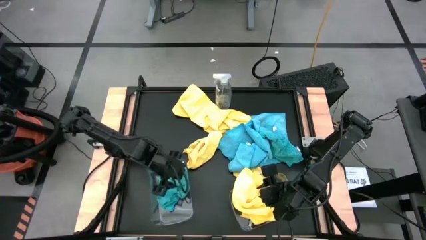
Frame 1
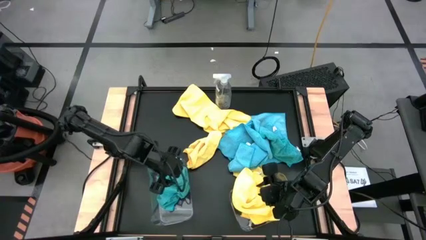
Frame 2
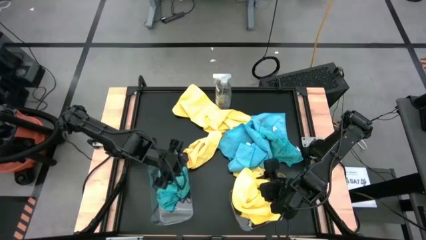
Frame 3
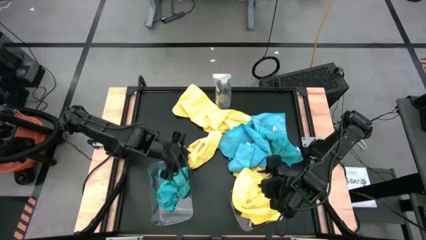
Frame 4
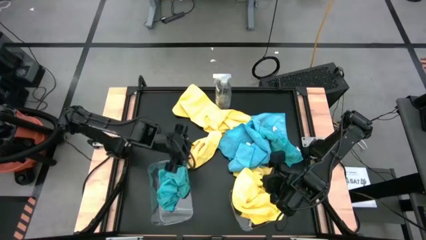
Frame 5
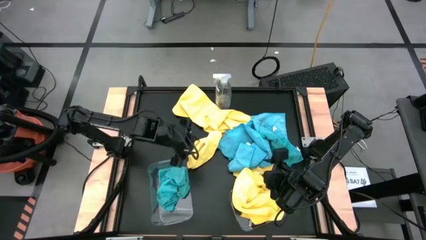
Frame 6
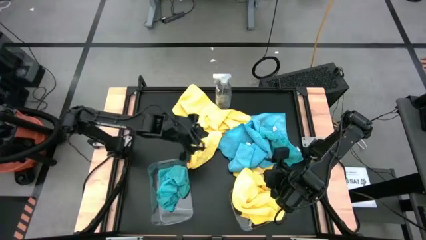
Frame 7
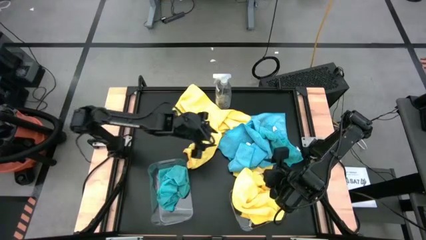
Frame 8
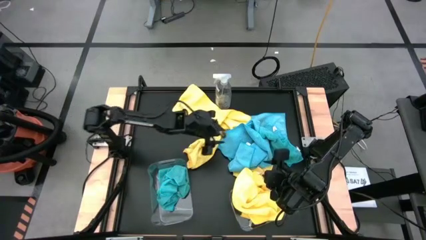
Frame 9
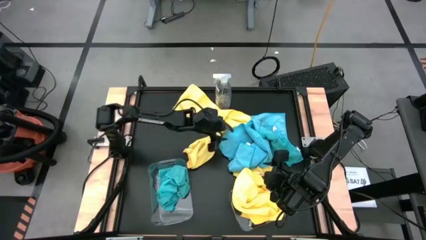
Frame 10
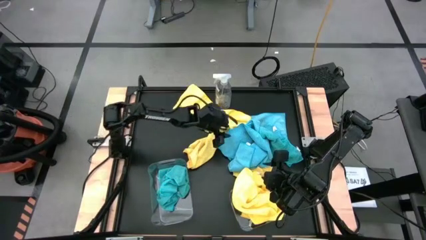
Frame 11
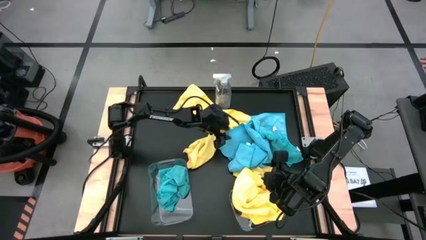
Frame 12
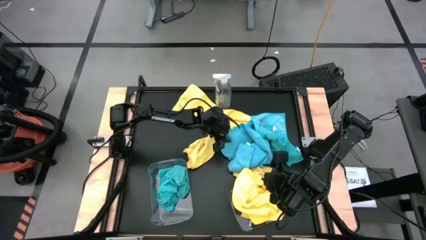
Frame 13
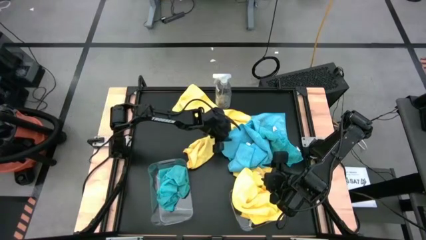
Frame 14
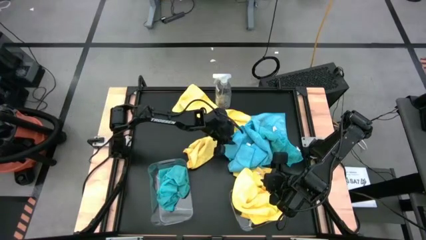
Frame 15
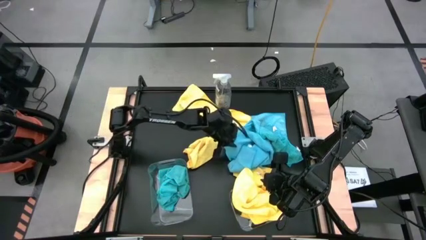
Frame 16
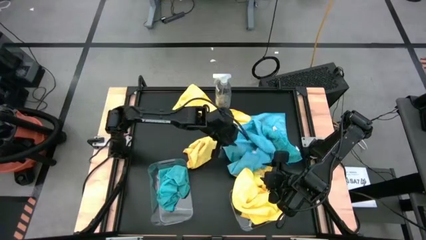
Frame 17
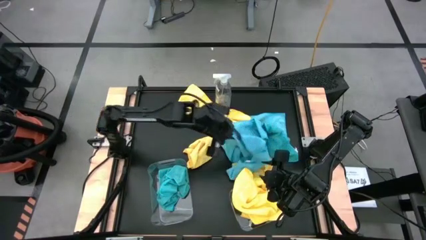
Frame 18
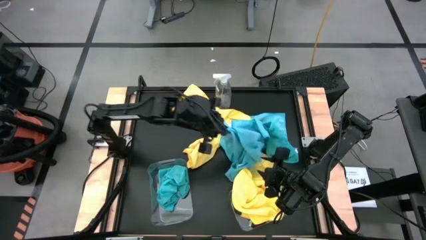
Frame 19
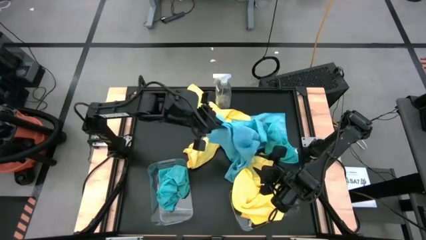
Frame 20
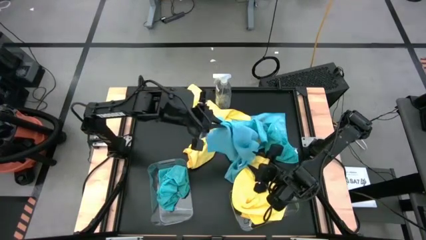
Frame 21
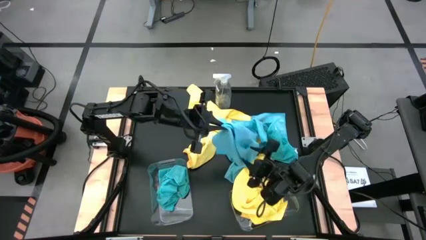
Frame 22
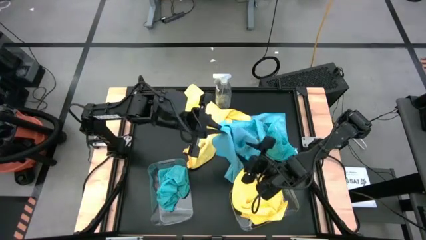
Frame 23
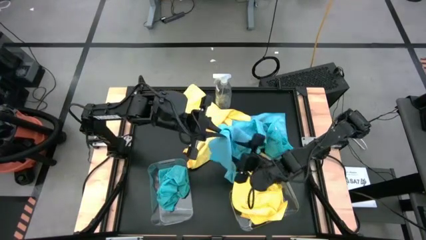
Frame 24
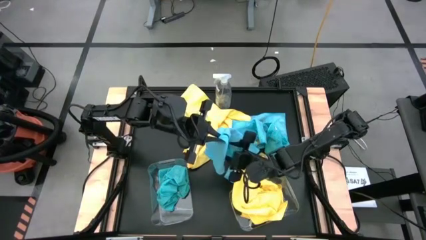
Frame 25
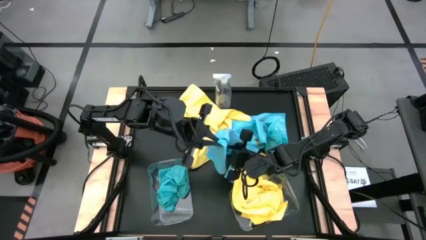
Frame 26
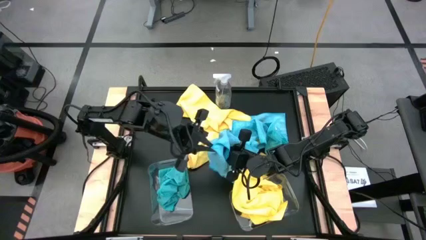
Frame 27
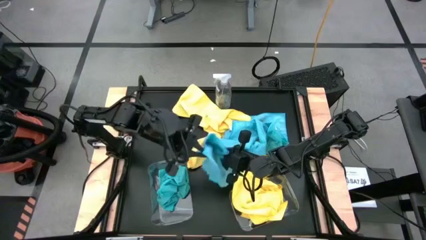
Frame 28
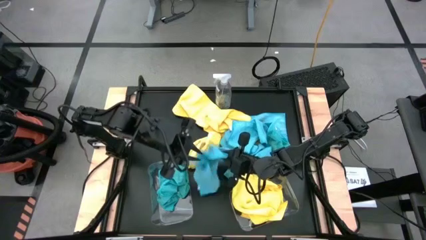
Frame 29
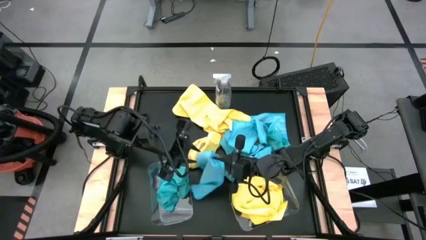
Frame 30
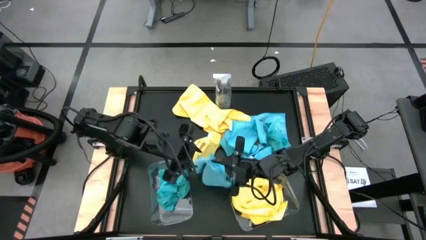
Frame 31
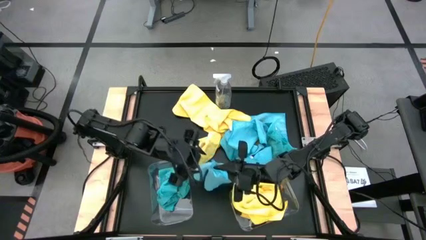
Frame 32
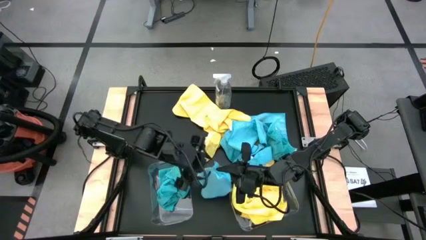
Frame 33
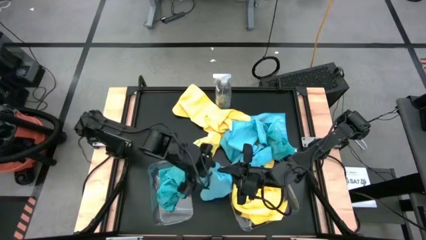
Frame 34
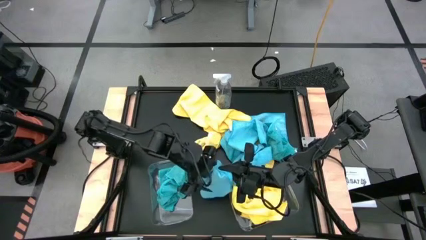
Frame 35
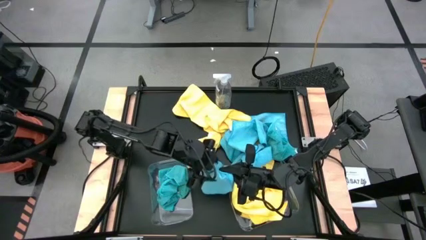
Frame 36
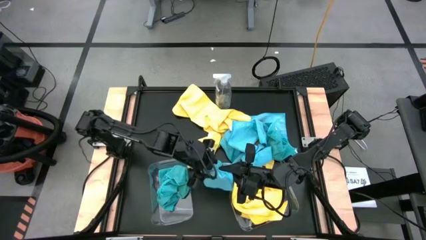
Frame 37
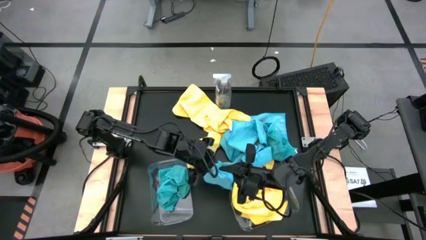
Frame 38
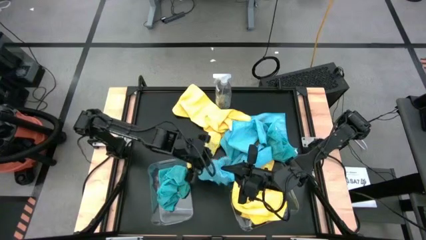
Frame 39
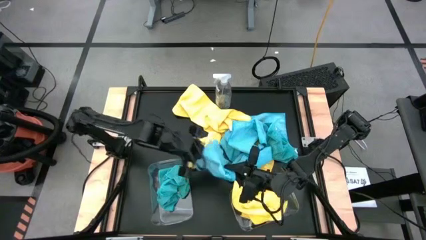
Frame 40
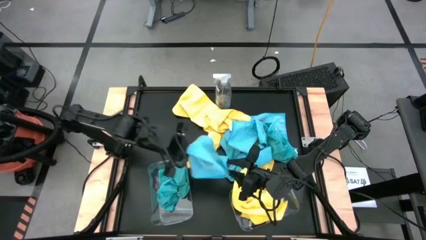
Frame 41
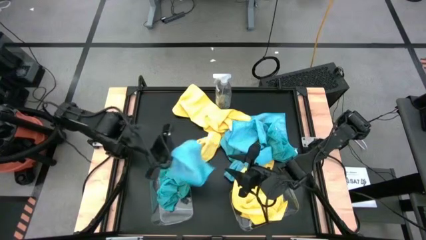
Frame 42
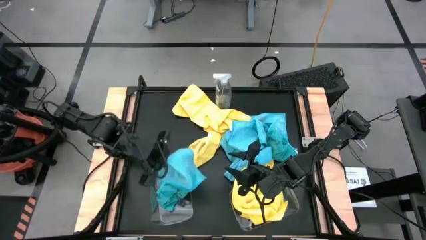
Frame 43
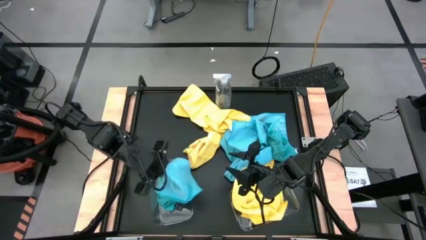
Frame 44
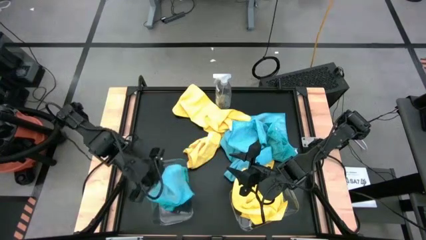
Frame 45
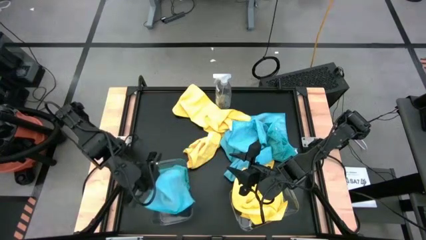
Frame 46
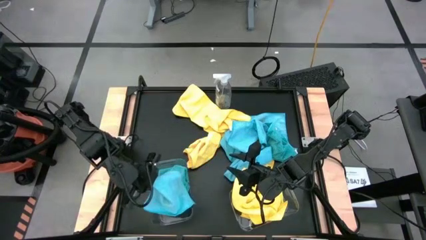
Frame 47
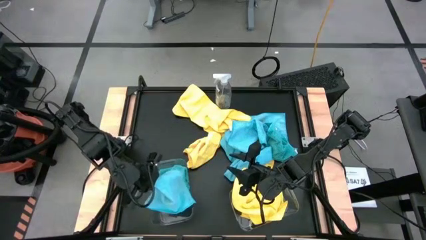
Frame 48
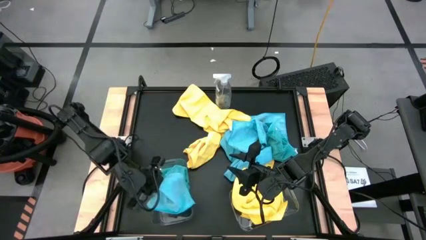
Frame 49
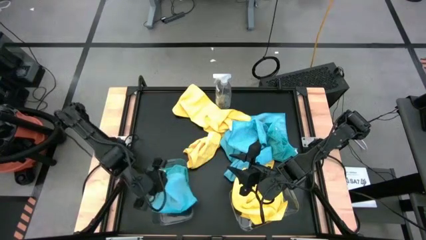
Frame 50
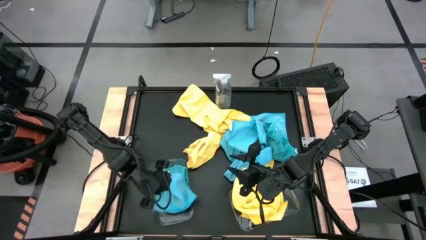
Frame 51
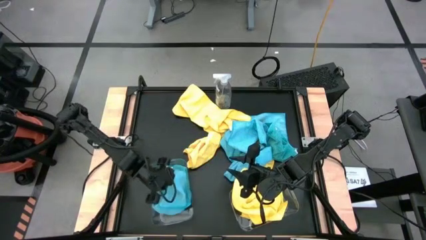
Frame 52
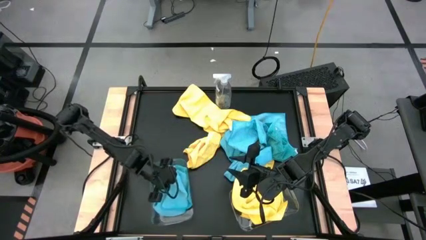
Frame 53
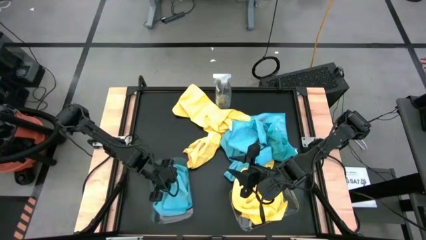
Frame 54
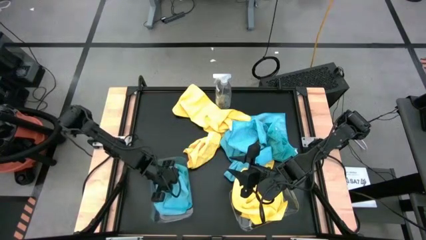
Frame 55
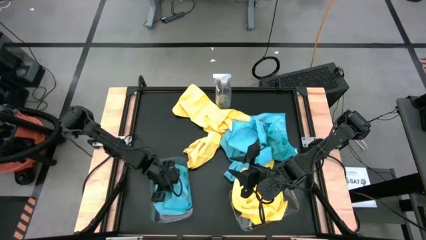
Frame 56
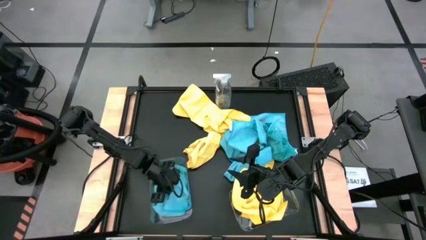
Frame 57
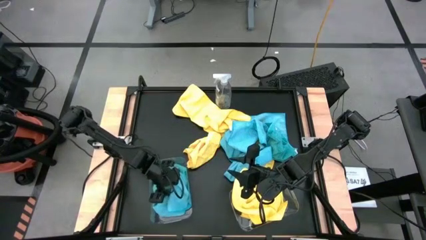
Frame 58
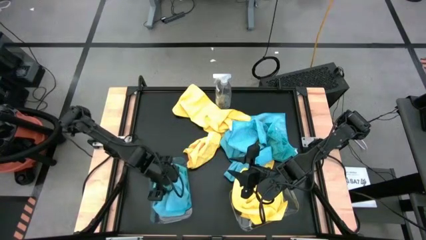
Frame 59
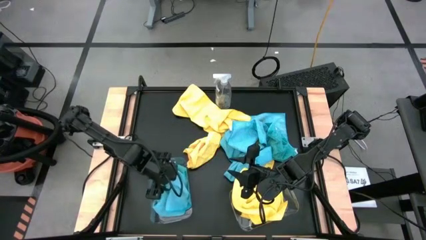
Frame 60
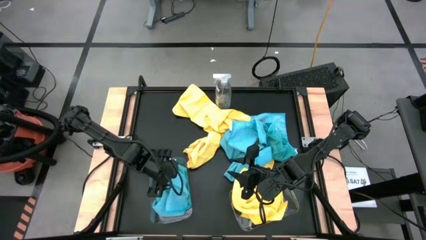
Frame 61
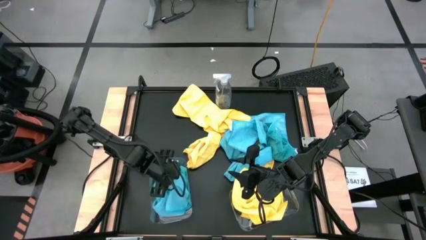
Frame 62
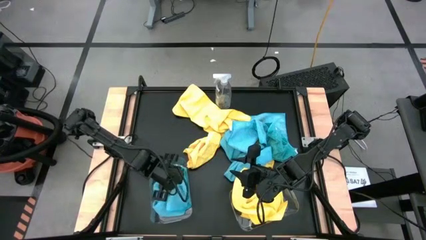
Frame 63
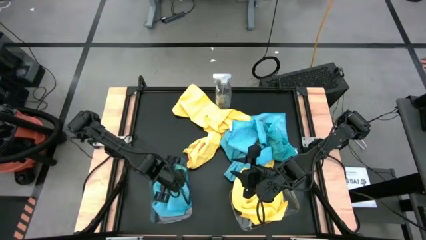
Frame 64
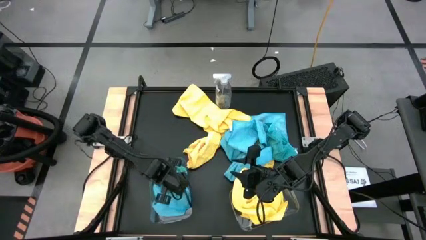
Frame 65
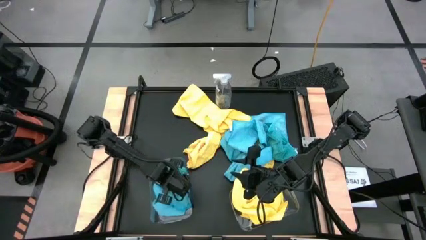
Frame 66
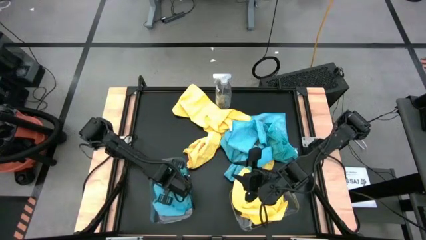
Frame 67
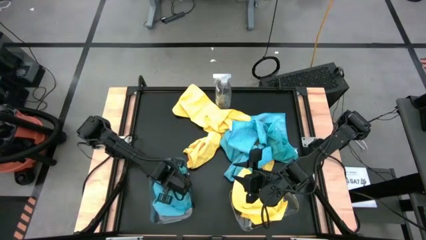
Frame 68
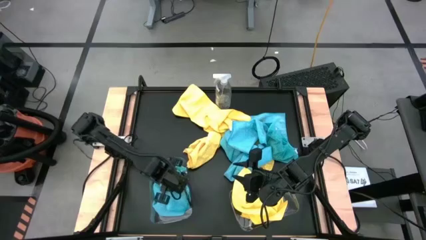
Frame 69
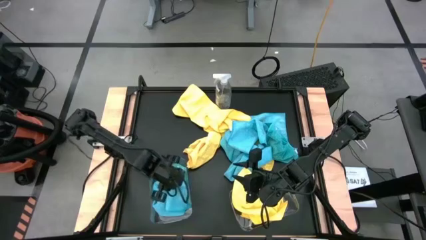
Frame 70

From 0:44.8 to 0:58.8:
Task: Sort microfiber towel by color & place in baskets
Put the blue microfiber towel into the left transparent bin
